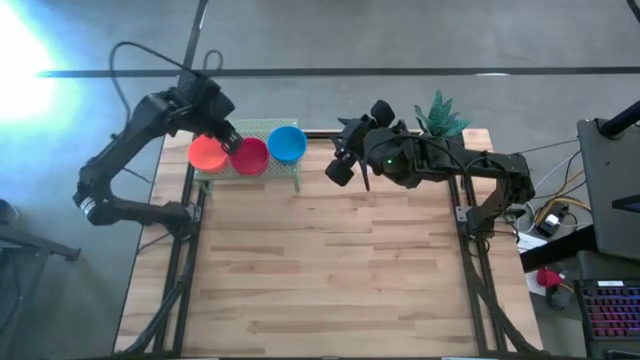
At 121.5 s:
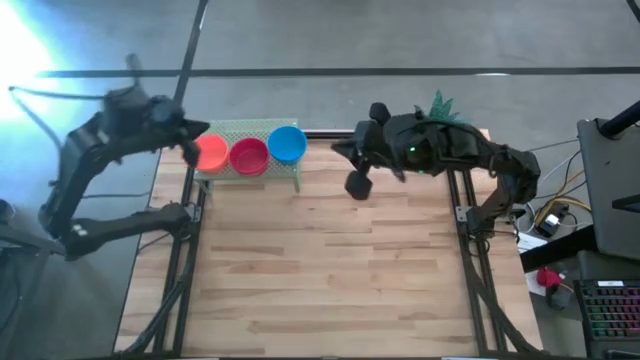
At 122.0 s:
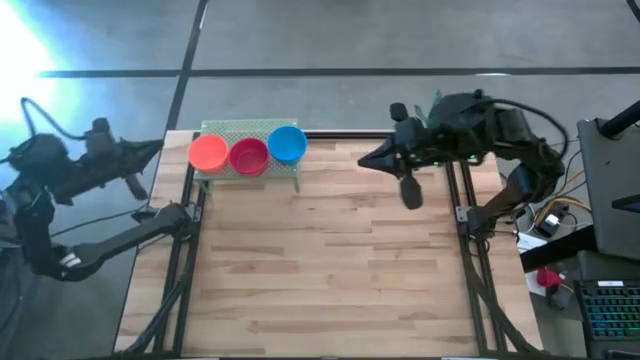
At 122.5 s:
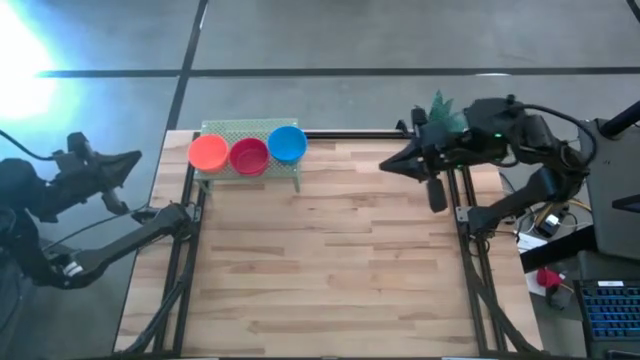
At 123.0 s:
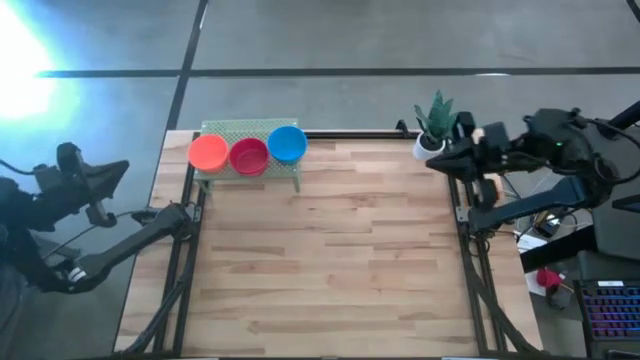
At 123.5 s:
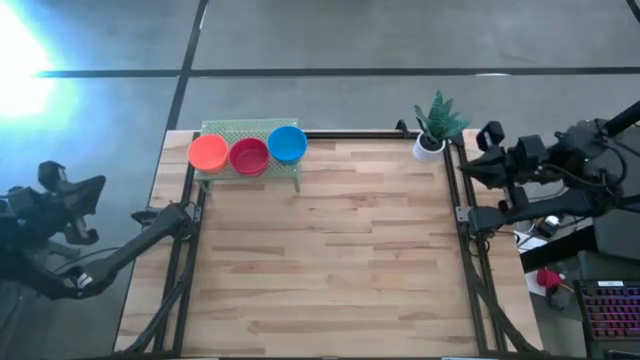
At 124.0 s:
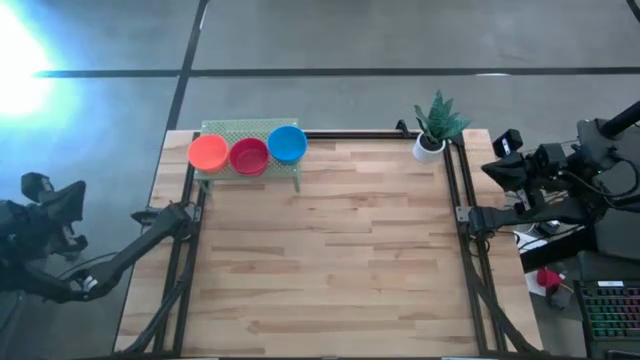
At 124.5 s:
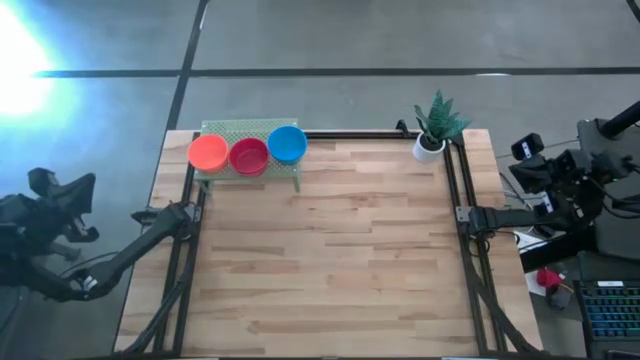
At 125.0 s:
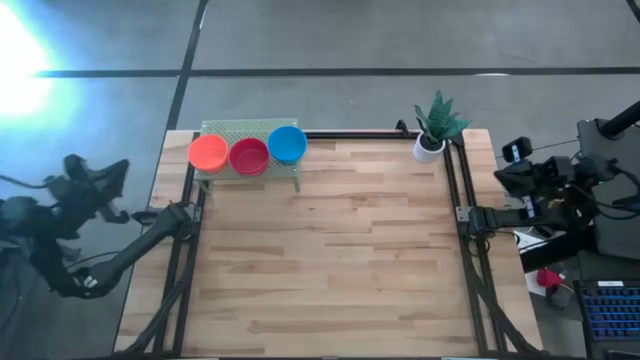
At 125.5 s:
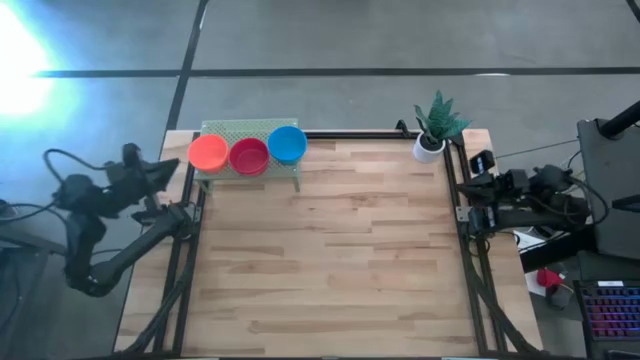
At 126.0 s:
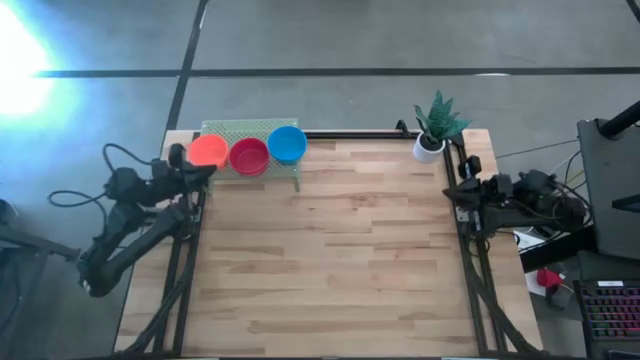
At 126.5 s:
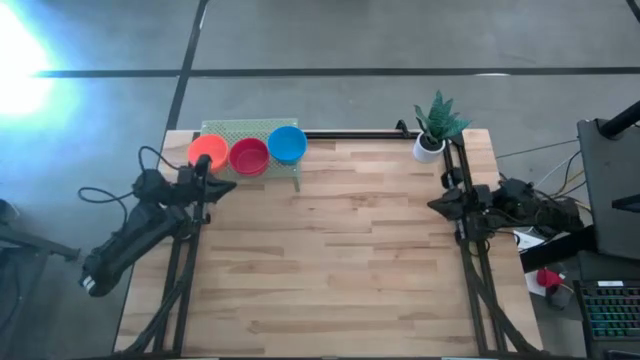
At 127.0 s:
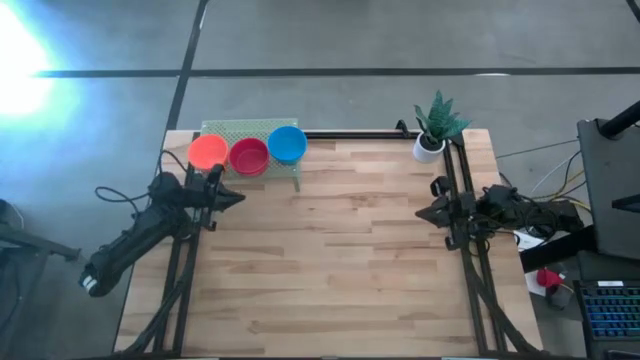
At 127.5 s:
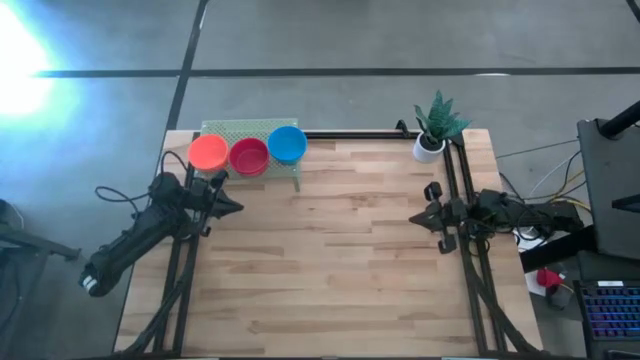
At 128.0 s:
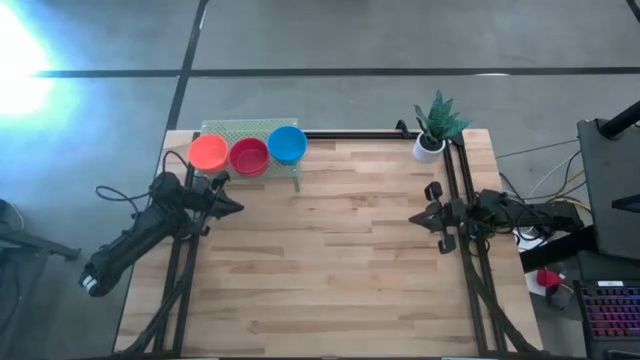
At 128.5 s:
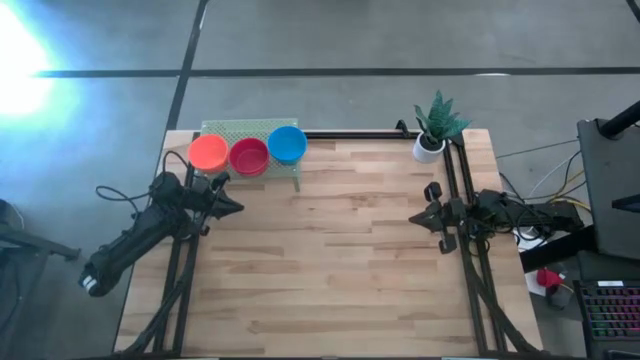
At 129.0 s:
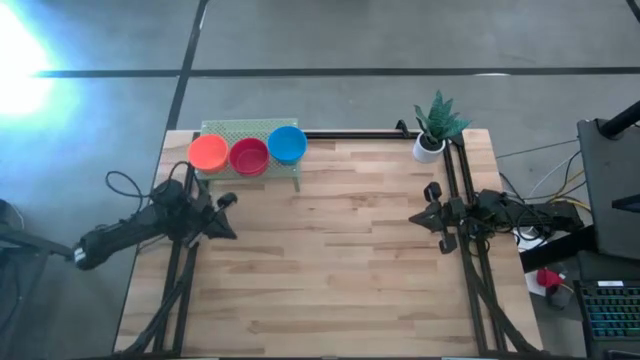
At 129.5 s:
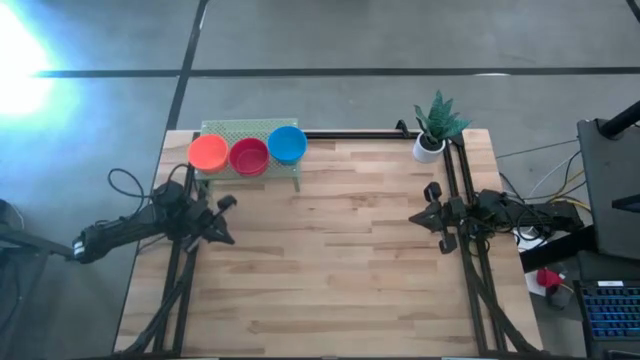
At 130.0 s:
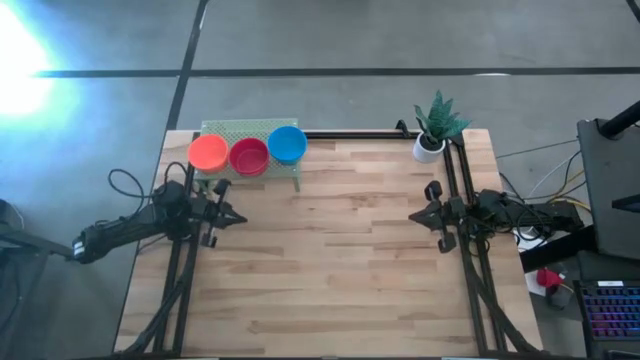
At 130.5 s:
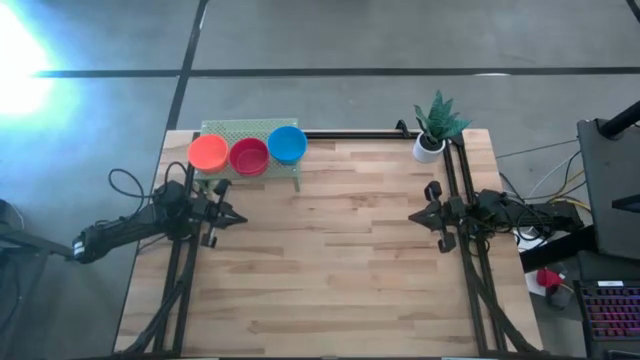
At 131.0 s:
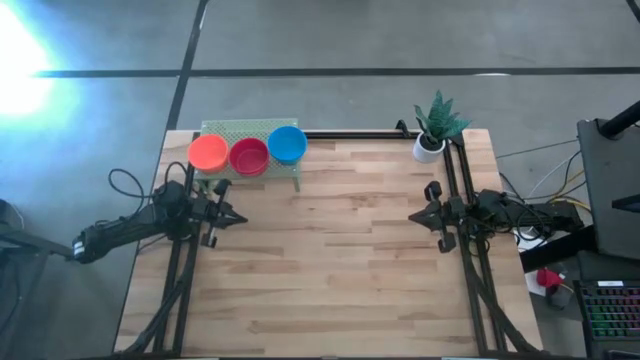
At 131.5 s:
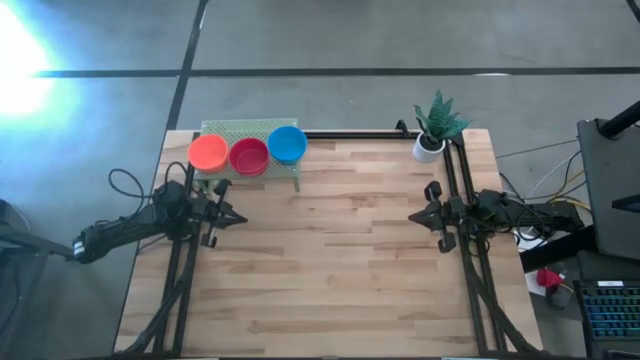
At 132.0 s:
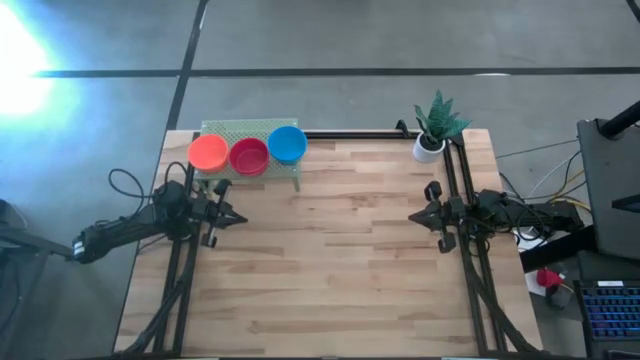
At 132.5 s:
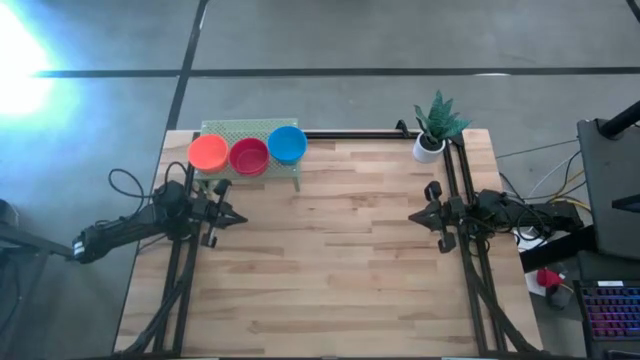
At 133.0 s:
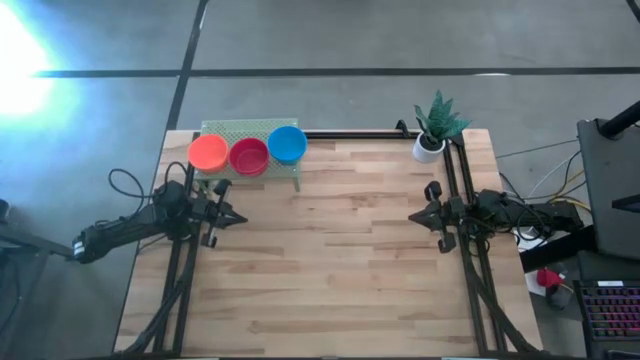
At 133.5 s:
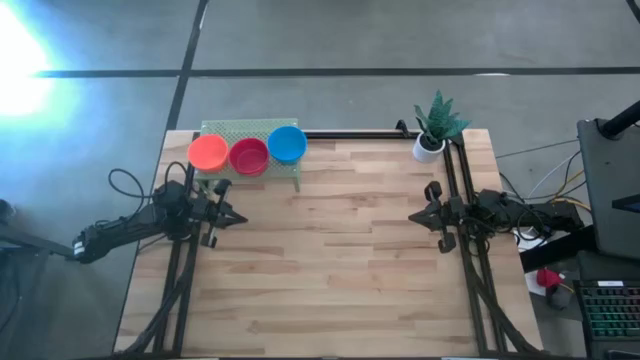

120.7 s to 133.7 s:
Task: Pick & Place Mini bowls
Return to Home Position

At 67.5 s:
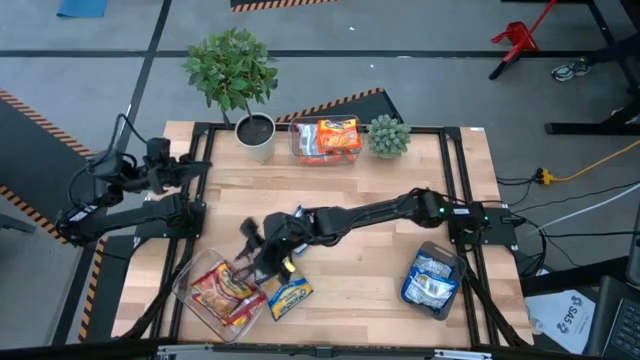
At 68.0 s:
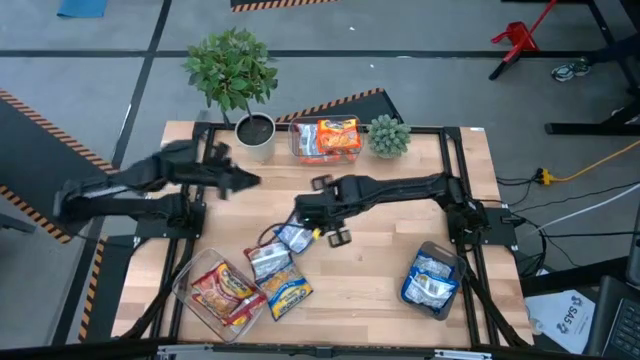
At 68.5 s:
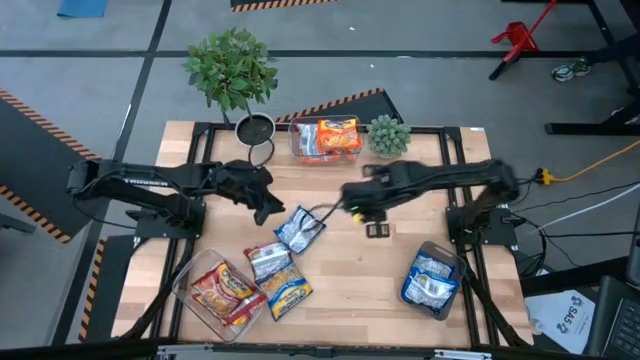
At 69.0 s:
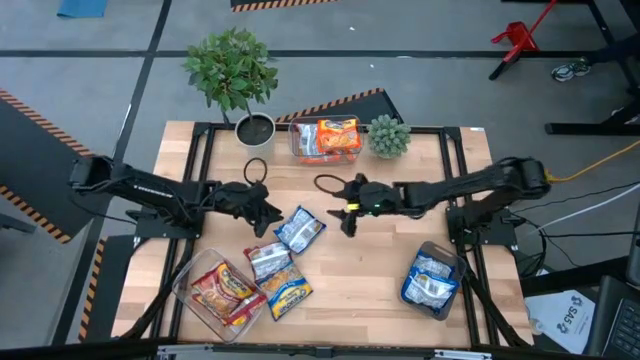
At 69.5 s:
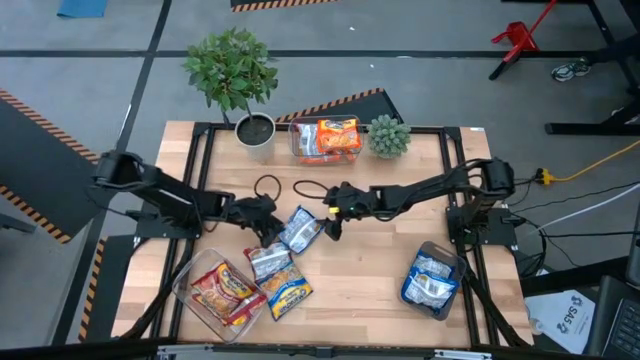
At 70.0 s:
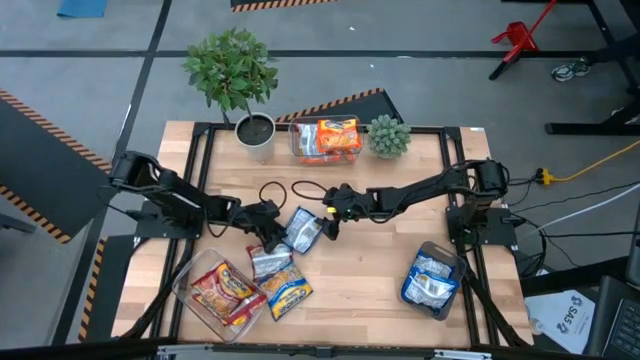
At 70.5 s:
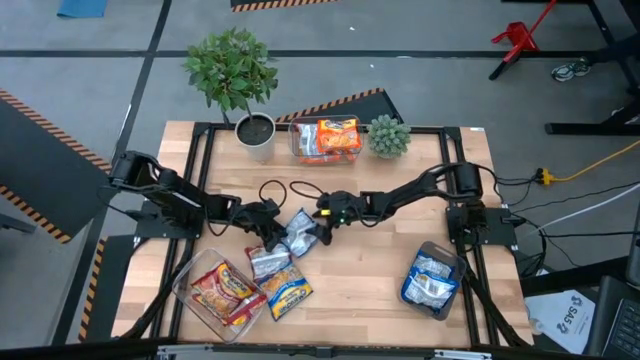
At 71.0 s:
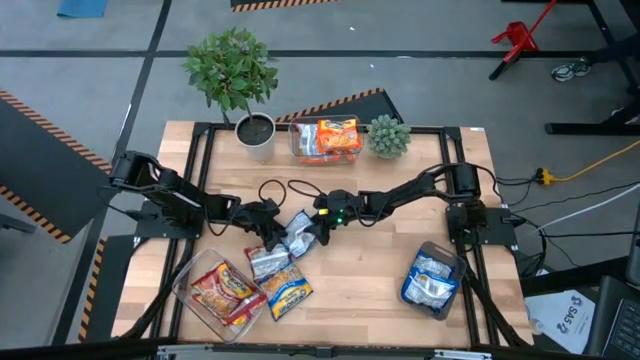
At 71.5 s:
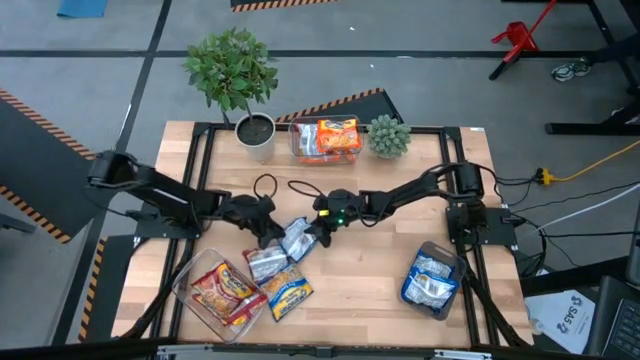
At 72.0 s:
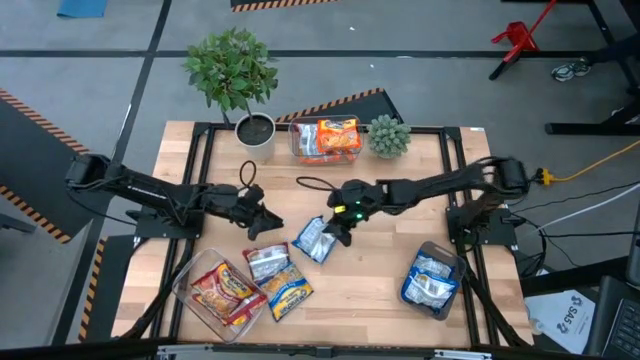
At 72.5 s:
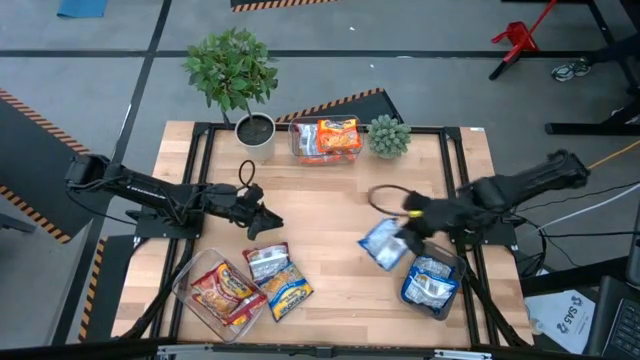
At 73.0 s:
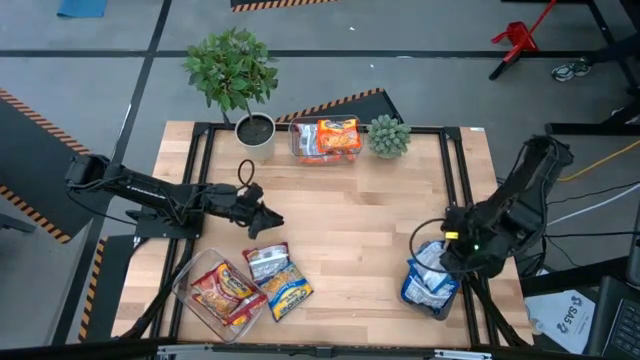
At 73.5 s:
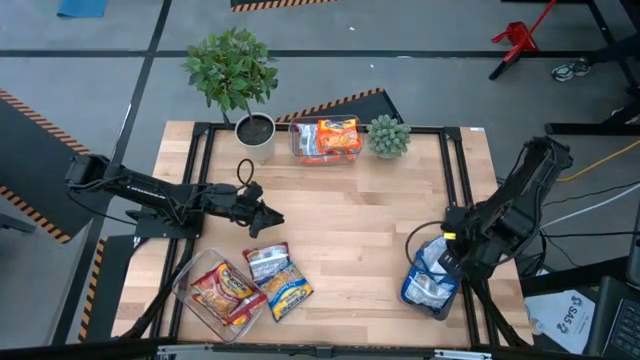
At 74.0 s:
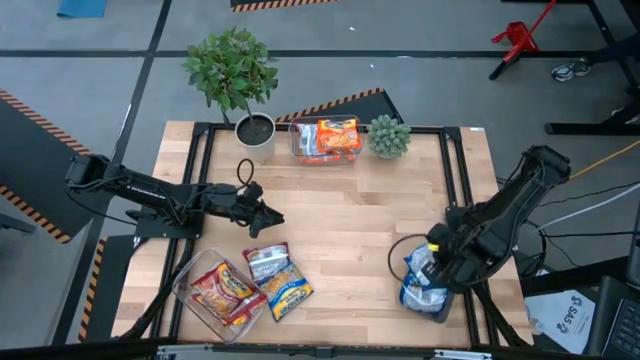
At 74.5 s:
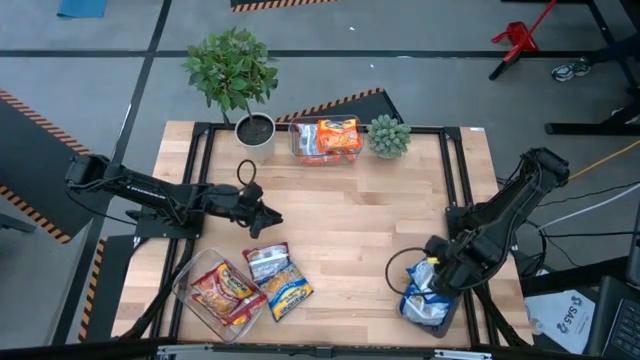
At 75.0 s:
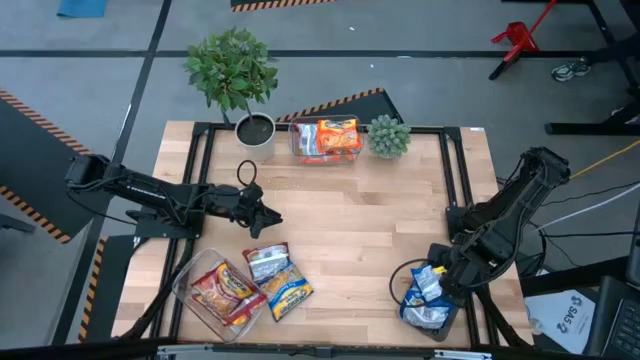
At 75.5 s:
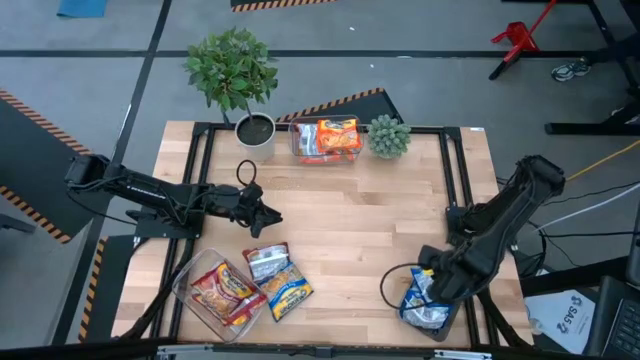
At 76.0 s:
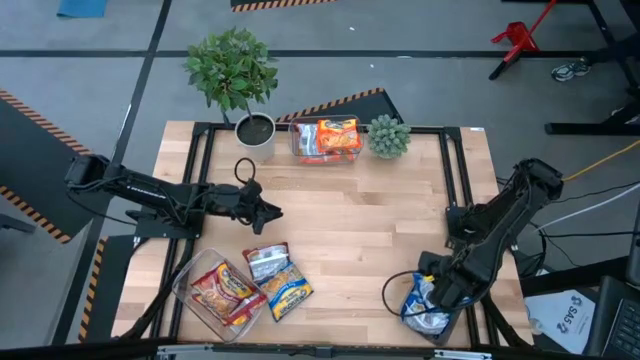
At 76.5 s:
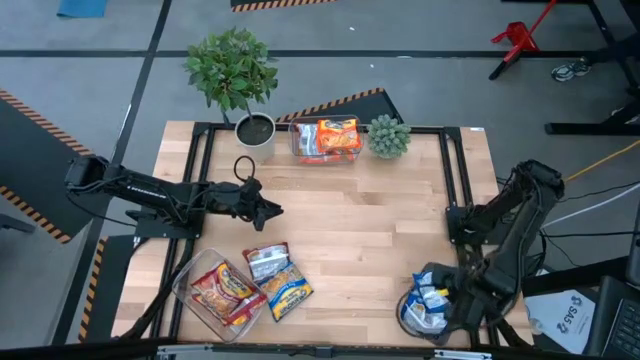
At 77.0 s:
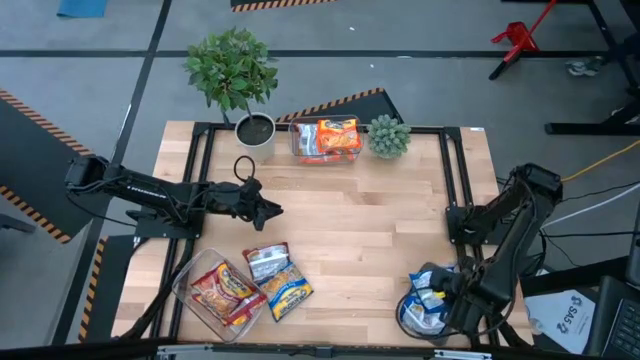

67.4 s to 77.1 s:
Task: Sort Maruchan noodles
Put the blue noodle pack into the black bin
